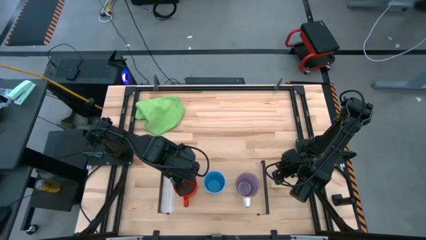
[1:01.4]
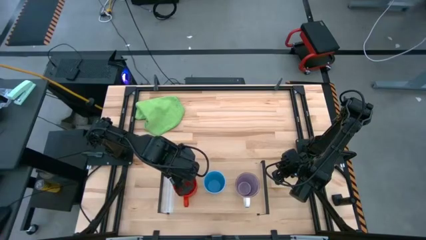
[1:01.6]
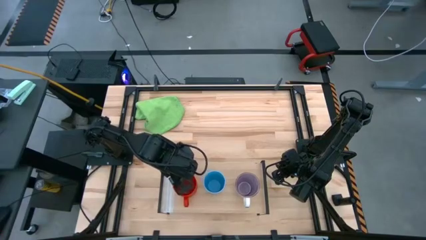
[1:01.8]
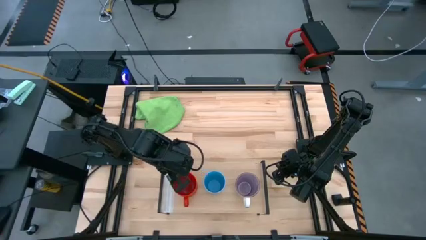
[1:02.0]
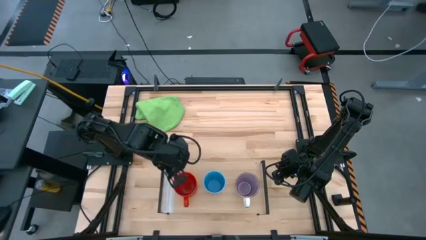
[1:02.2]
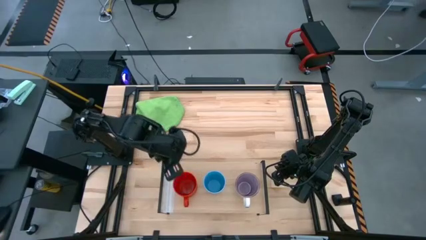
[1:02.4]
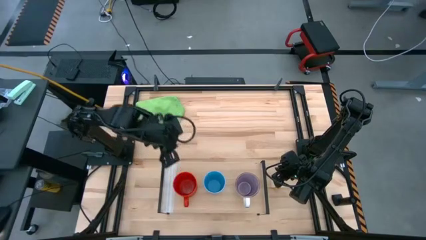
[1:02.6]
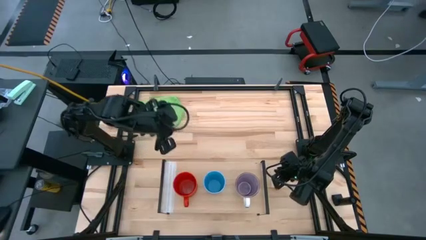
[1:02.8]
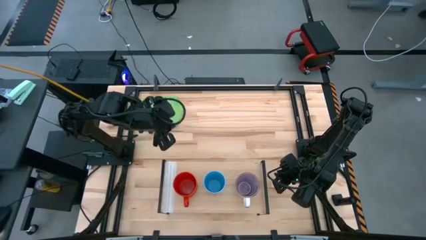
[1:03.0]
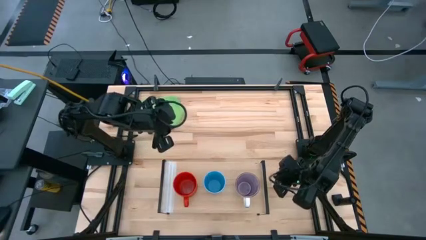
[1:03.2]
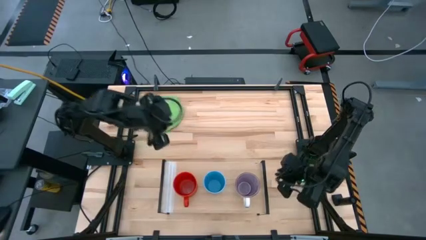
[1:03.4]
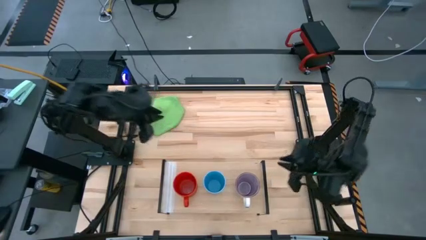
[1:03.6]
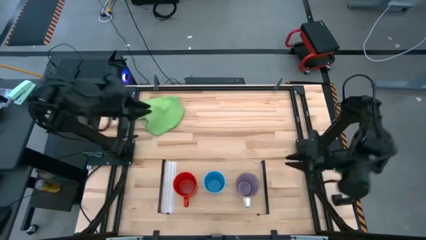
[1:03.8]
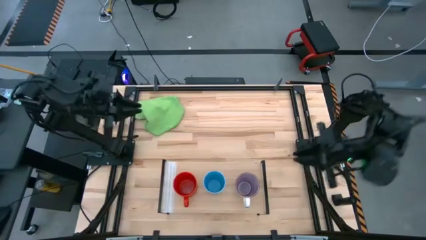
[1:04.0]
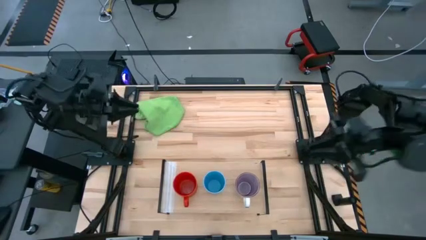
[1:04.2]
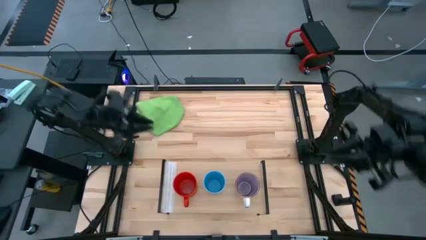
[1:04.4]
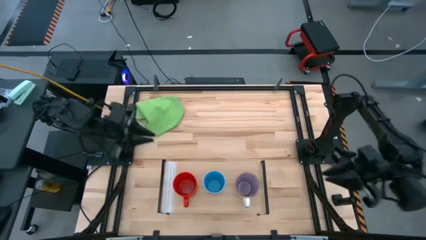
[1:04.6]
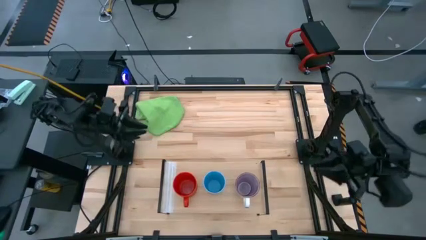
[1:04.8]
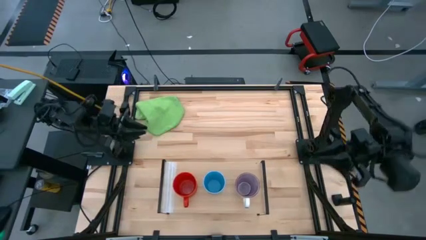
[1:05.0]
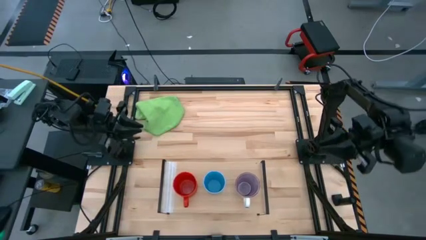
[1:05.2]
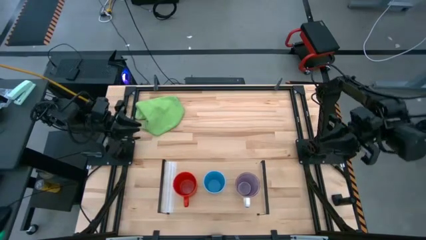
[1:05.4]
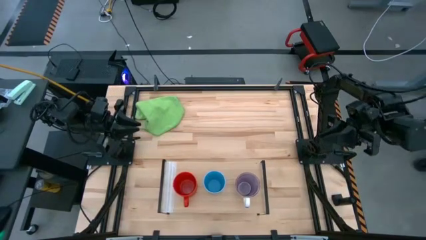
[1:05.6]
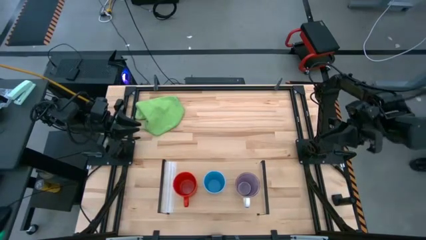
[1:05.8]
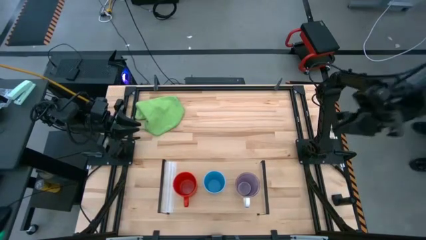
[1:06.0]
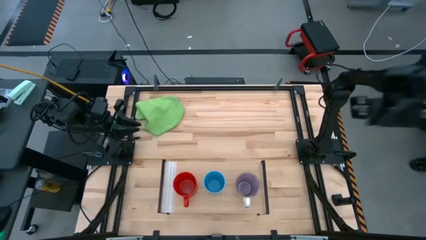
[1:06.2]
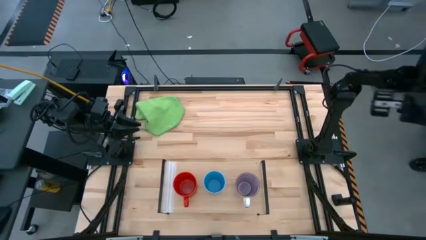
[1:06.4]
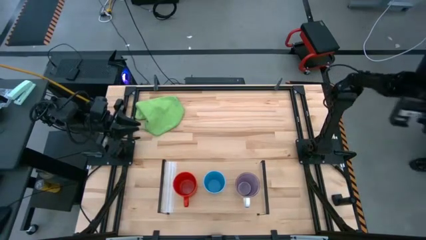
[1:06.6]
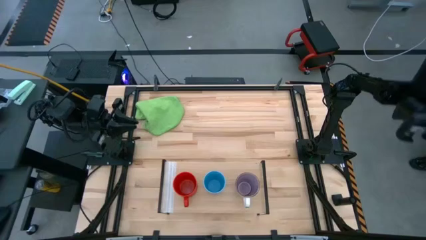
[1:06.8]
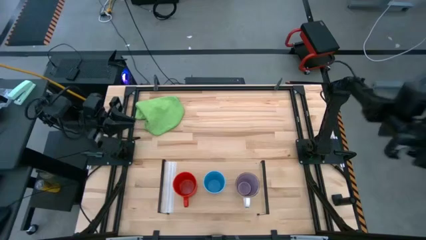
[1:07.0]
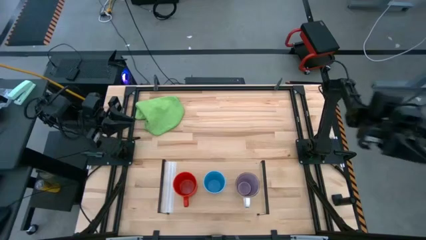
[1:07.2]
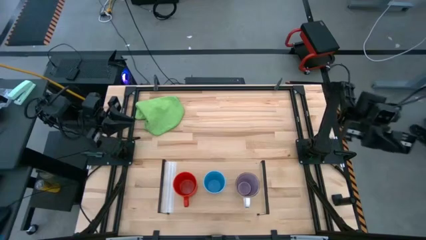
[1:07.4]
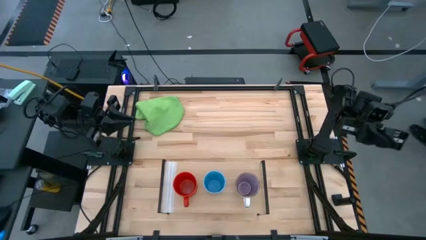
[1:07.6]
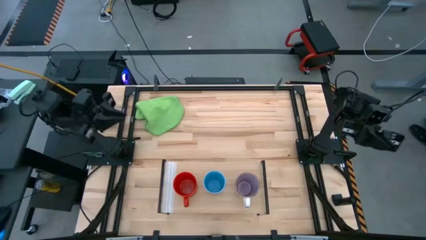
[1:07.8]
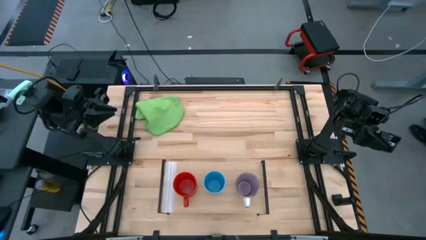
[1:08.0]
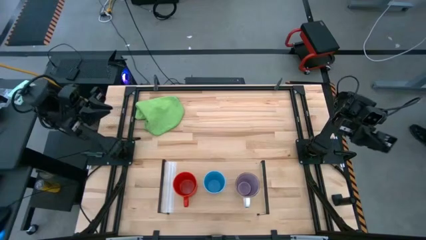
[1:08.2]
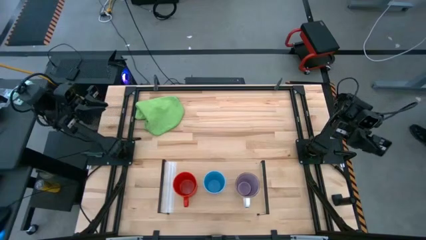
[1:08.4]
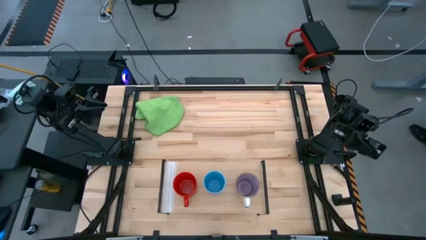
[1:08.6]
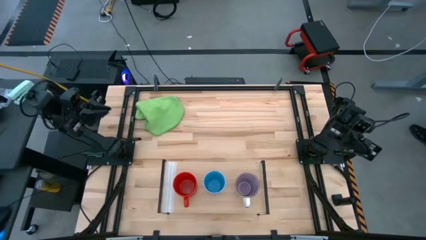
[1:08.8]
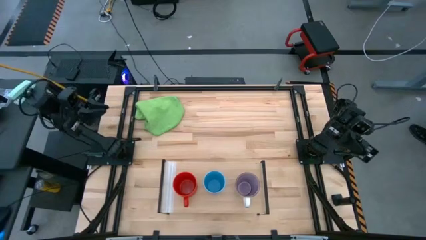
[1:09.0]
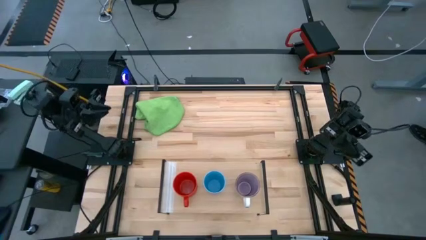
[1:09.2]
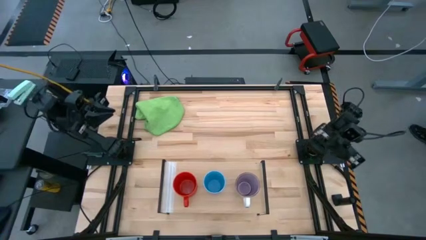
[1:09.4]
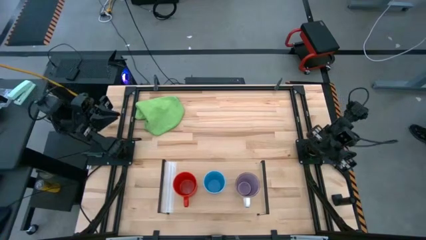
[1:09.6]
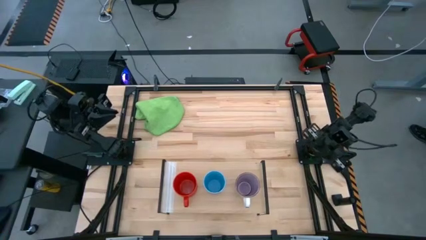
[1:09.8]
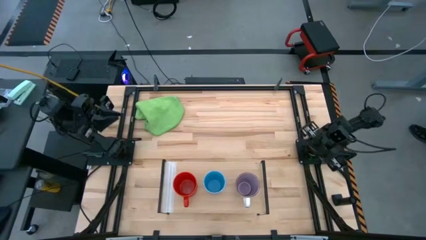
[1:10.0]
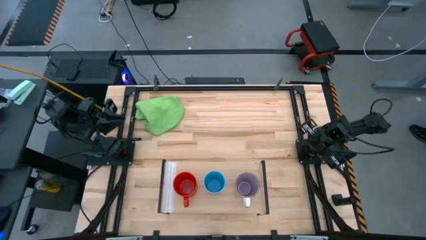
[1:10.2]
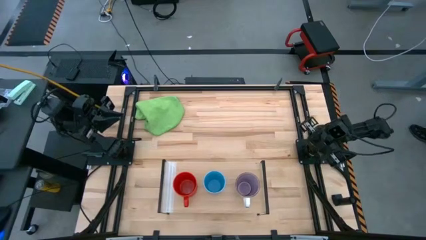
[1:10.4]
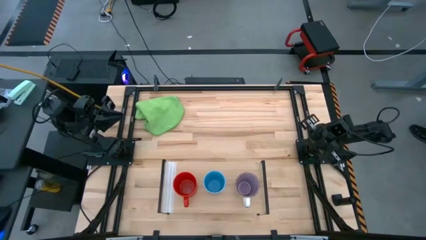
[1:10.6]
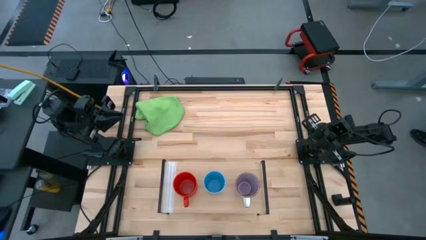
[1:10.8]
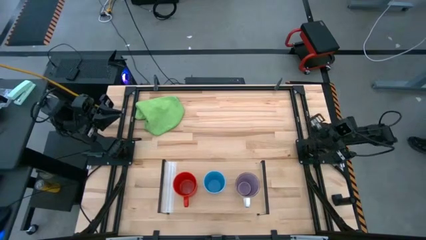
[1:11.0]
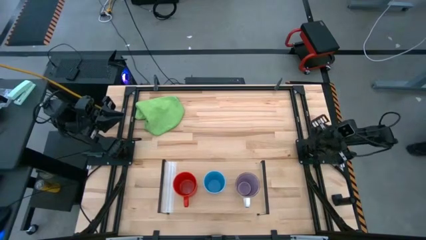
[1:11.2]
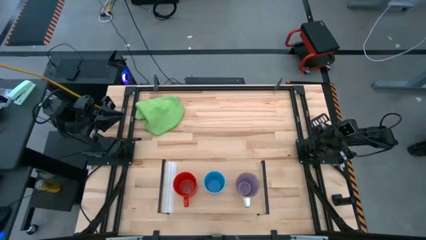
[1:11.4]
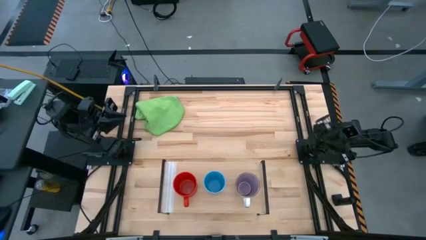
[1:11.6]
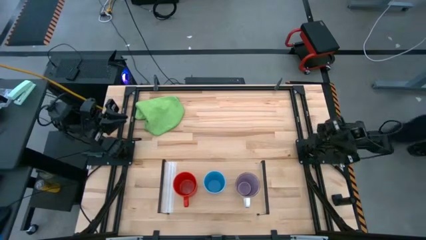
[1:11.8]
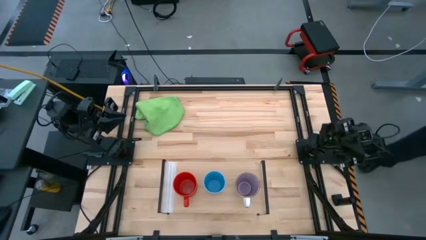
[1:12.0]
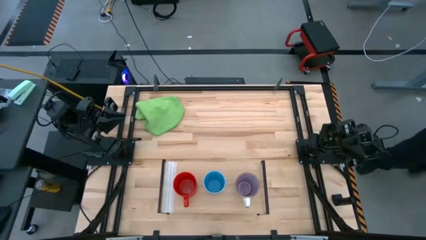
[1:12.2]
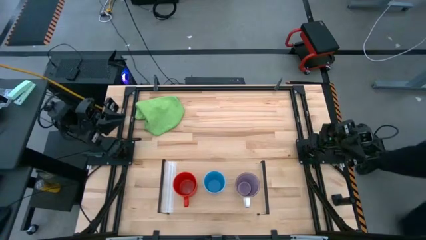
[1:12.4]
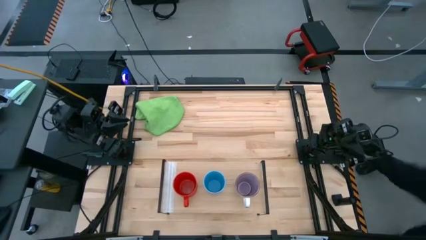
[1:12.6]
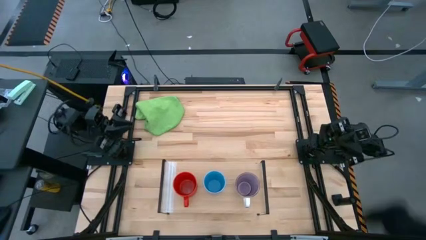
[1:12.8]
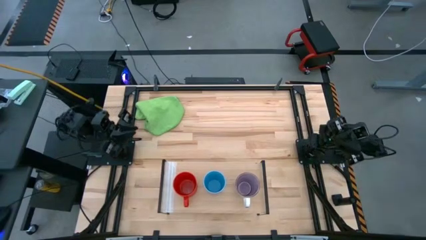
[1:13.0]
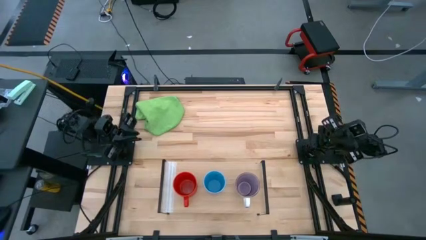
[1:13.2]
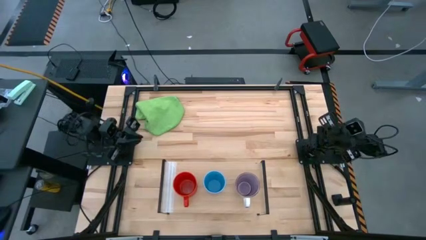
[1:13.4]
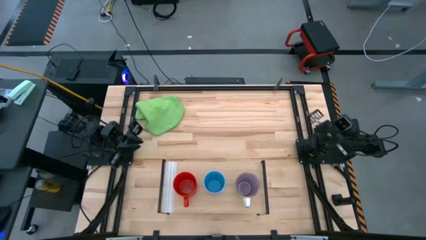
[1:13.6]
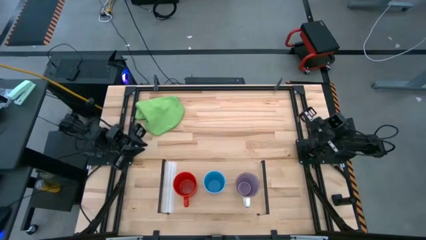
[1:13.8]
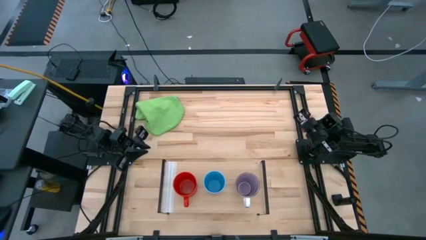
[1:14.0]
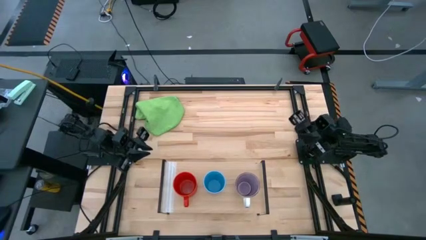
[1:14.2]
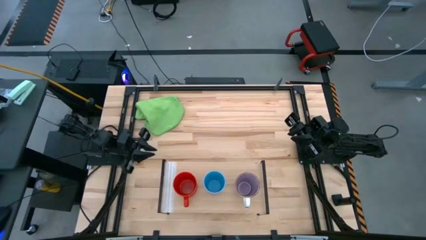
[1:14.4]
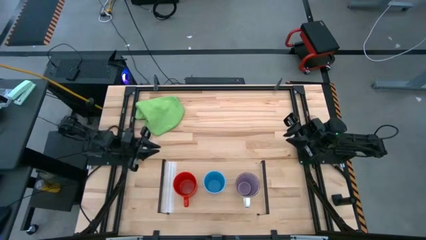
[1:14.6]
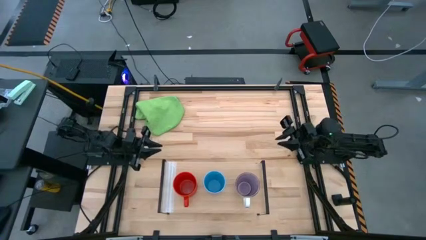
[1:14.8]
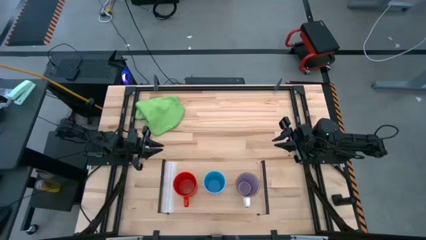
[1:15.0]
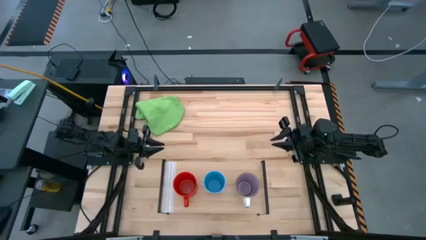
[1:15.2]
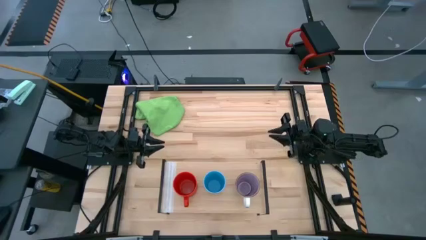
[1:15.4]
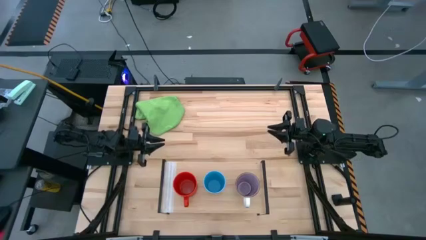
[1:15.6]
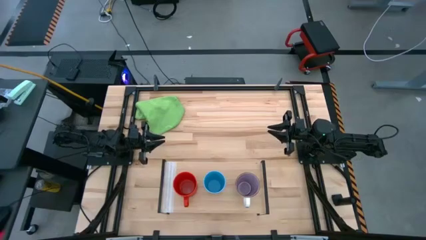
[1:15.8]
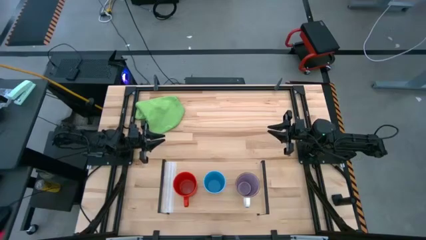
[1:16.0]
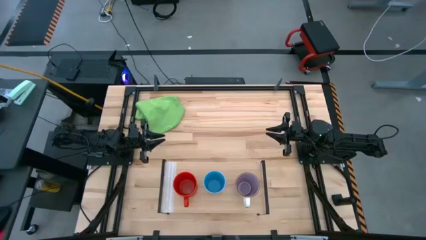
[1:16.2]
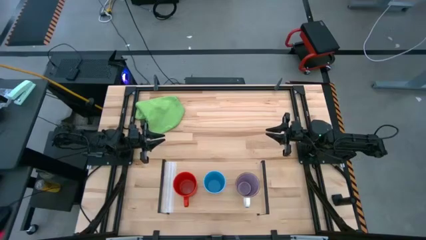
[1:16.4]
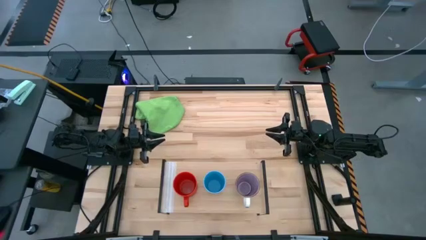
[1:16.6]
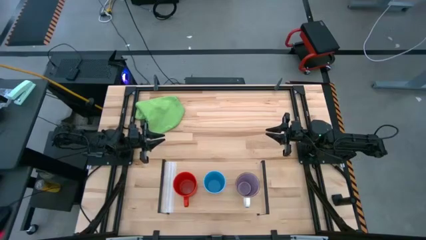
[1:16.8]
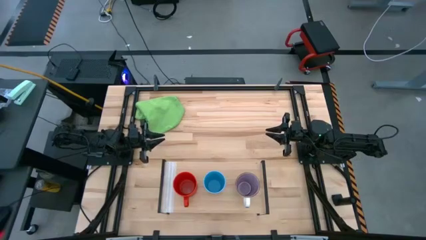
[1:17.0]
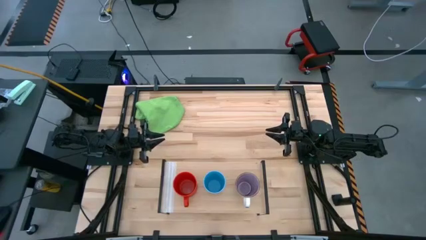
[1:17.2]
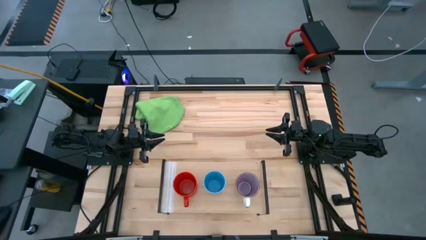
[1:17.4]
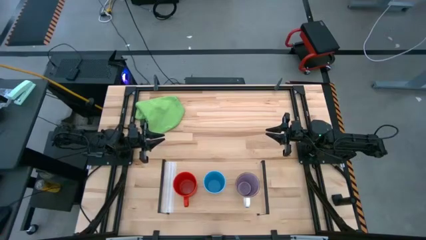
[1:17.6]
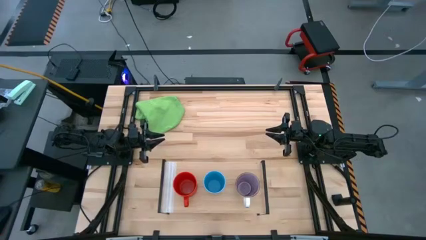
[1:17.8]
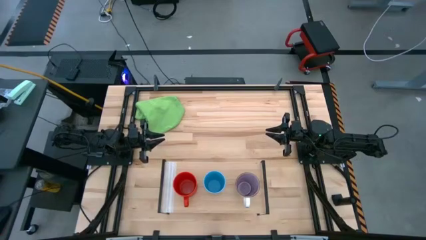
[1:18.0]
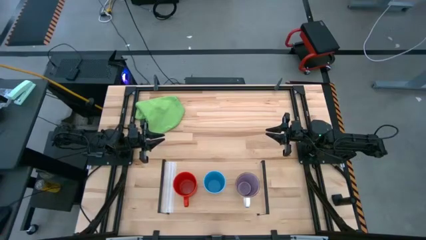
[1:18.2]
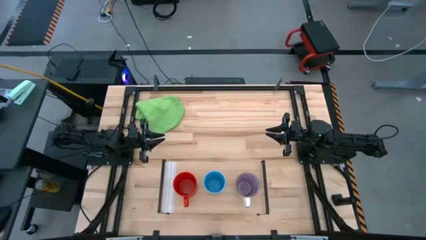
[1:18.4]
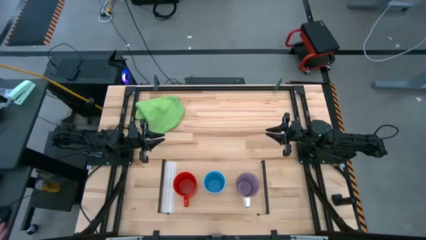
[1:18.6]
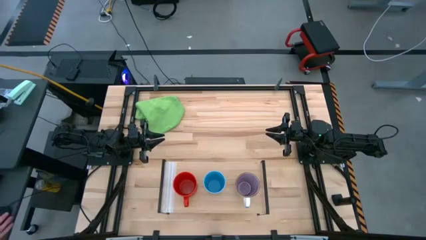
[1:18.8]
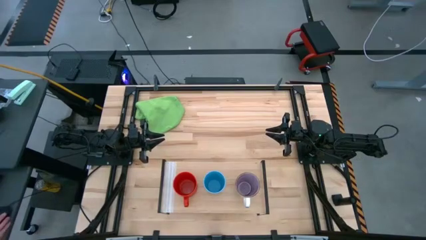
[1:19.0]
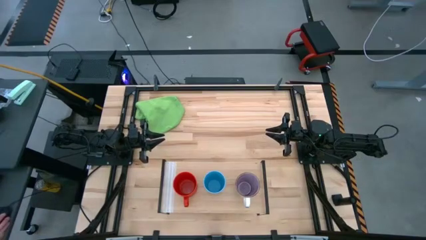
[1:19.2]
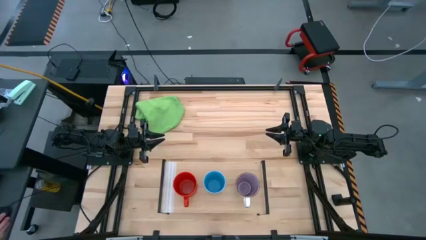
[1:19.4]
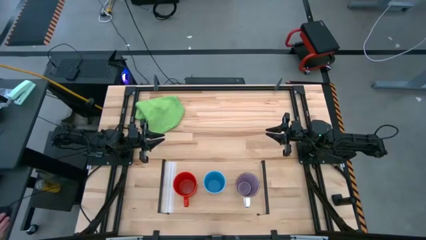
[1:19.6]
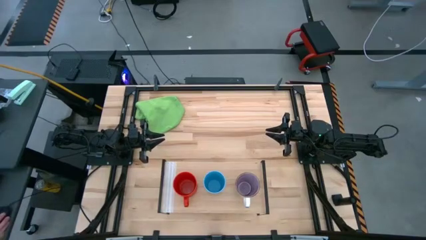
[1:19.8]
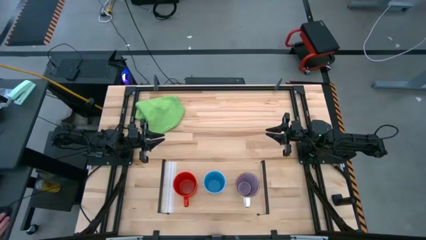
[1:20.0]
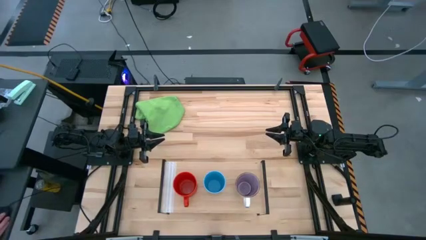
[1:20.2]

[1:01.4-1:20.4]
Task: Stack small to large cups/mugs on shelf
Return to Home Position
